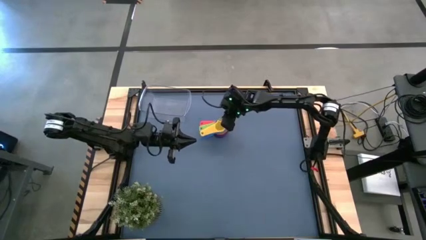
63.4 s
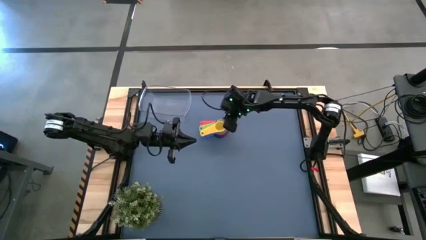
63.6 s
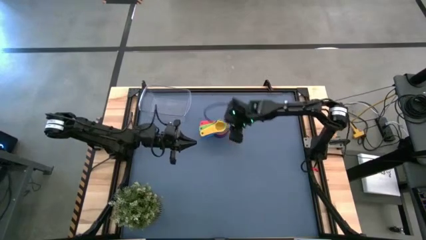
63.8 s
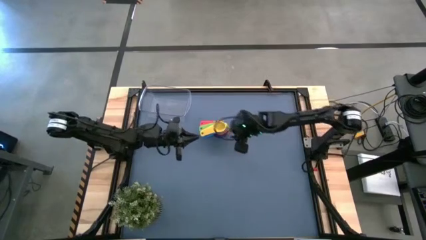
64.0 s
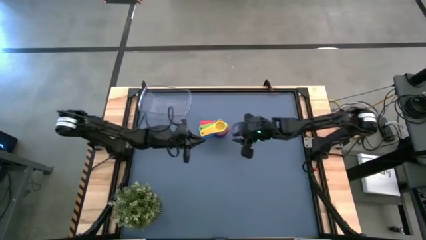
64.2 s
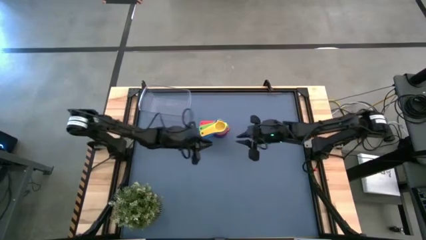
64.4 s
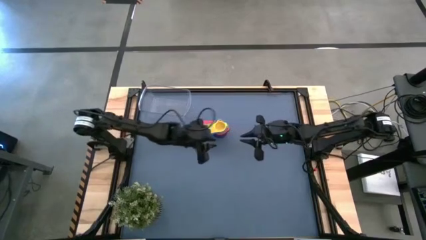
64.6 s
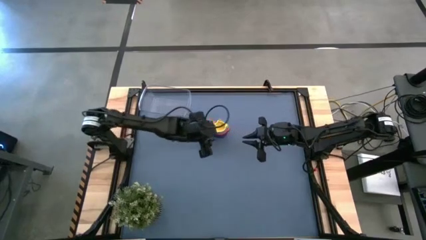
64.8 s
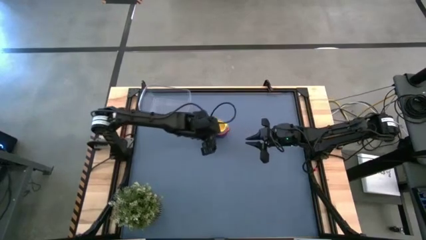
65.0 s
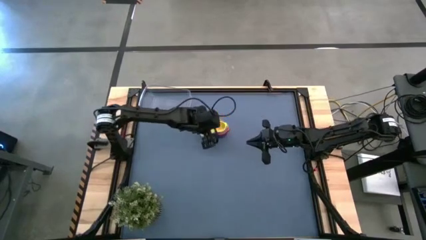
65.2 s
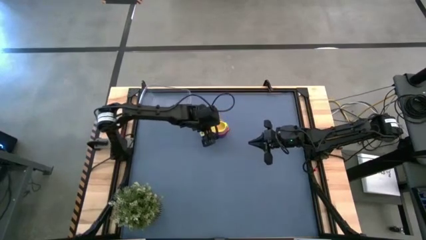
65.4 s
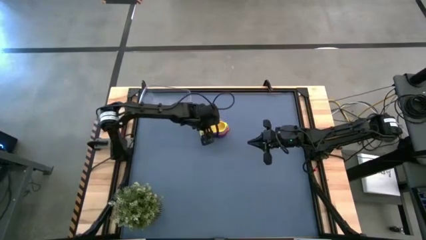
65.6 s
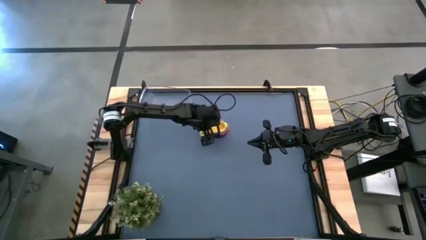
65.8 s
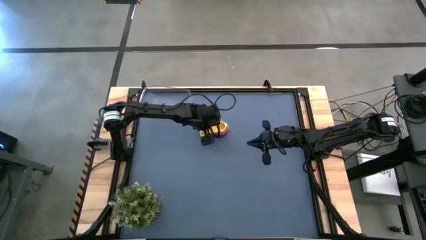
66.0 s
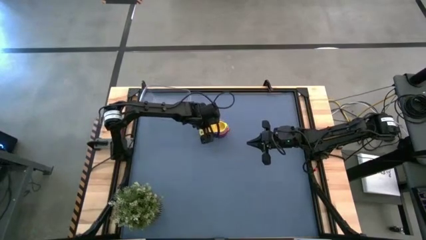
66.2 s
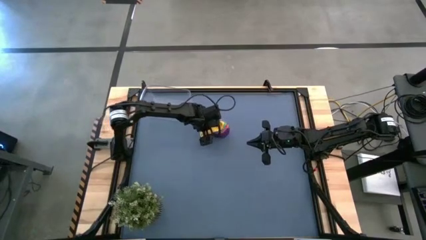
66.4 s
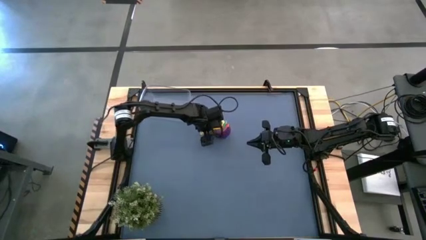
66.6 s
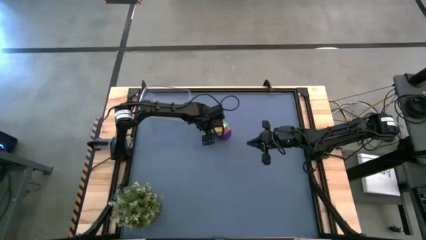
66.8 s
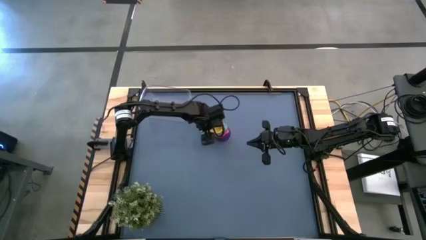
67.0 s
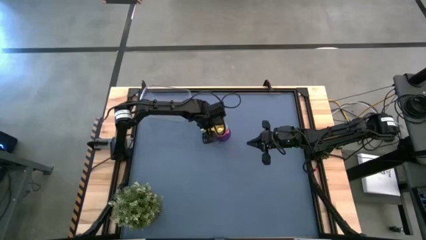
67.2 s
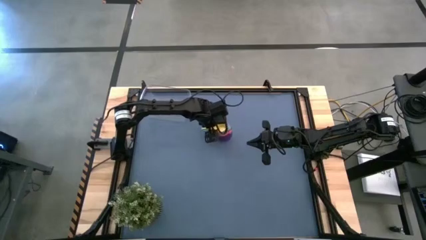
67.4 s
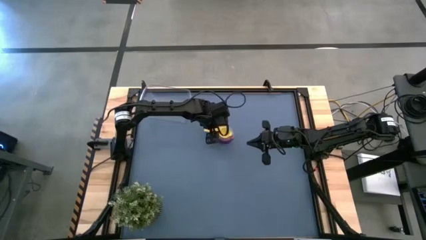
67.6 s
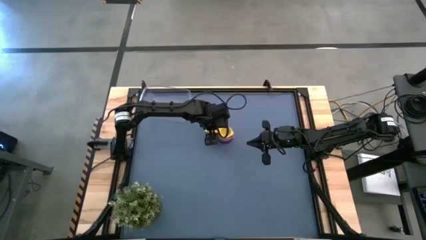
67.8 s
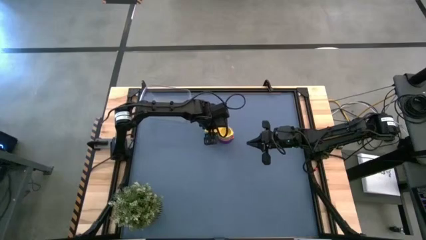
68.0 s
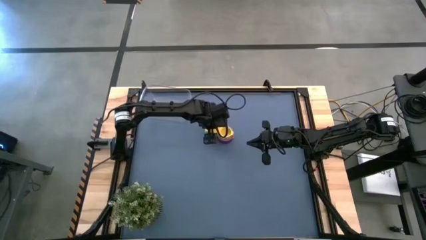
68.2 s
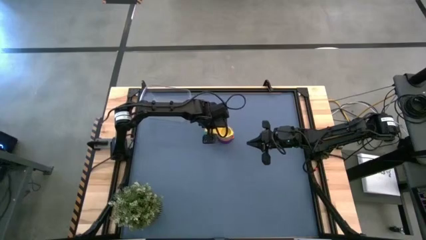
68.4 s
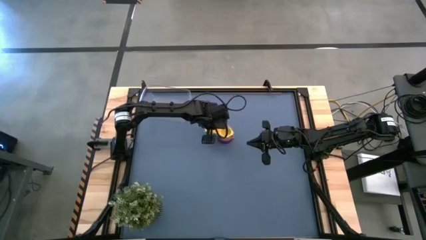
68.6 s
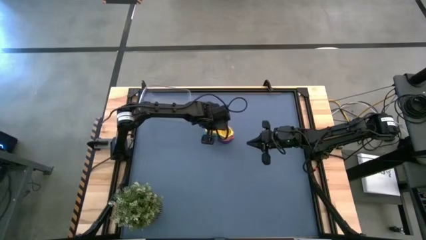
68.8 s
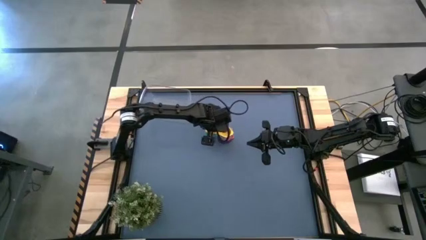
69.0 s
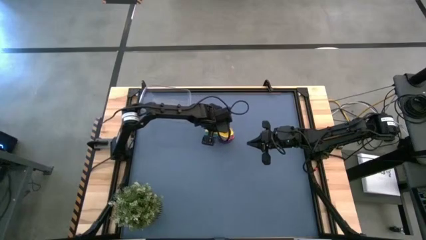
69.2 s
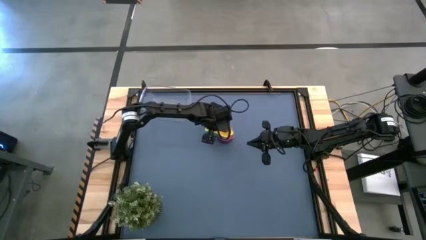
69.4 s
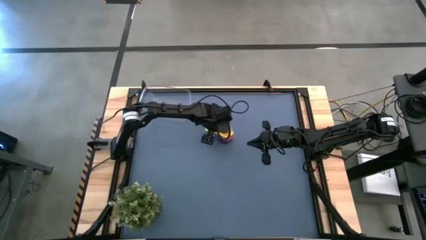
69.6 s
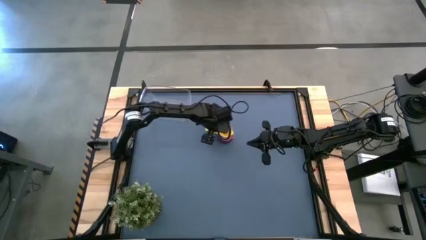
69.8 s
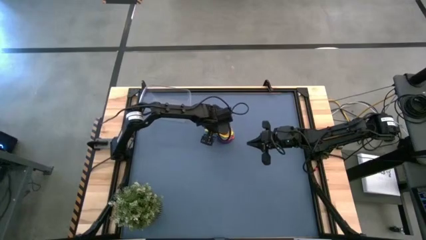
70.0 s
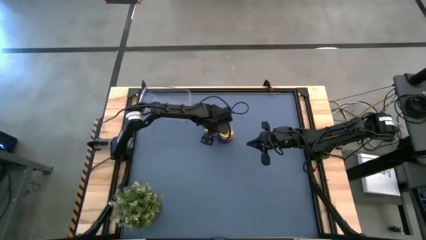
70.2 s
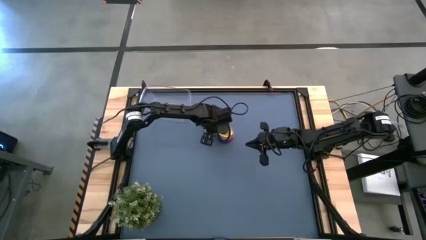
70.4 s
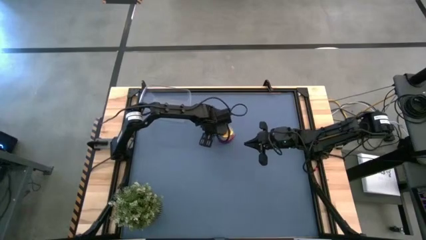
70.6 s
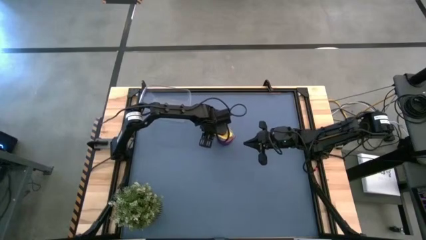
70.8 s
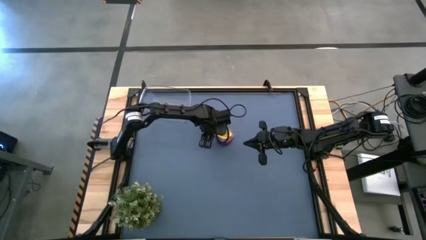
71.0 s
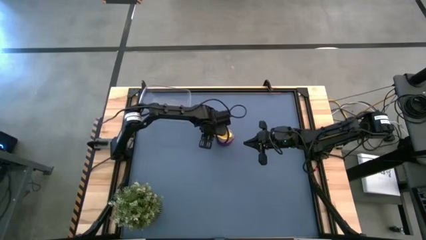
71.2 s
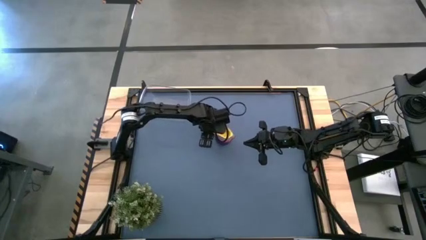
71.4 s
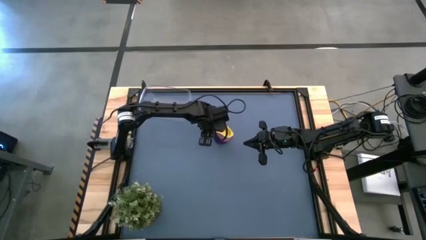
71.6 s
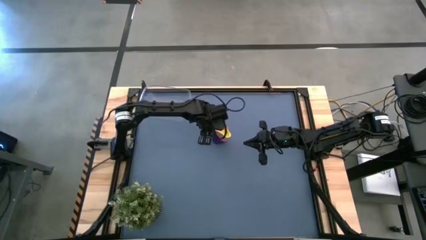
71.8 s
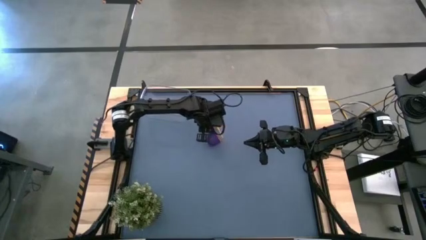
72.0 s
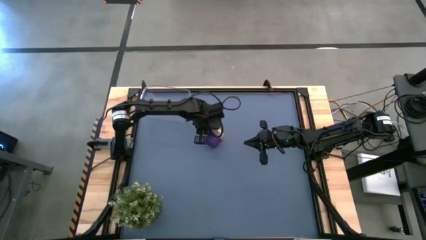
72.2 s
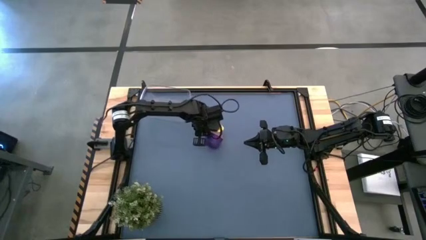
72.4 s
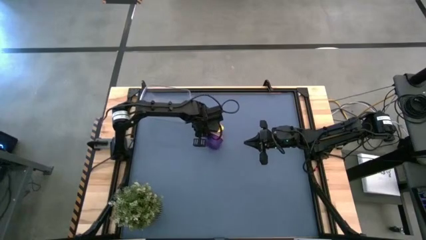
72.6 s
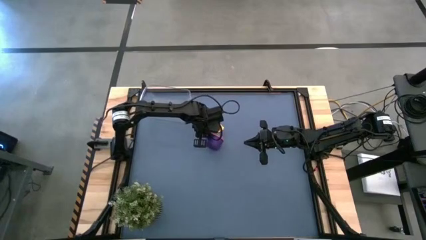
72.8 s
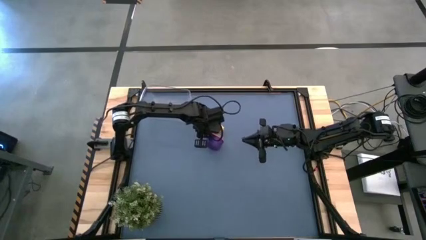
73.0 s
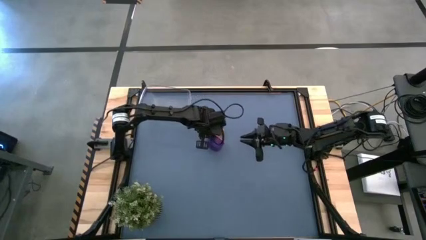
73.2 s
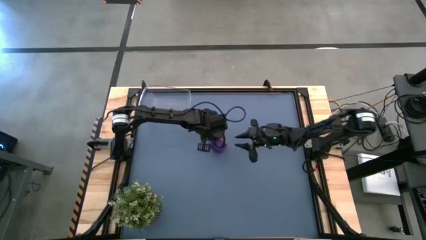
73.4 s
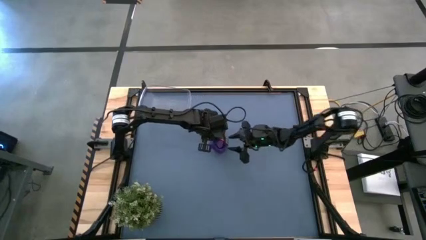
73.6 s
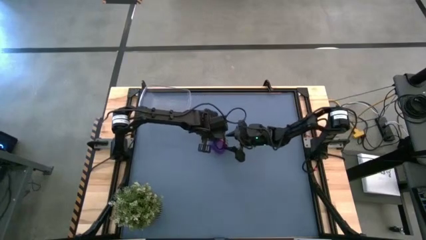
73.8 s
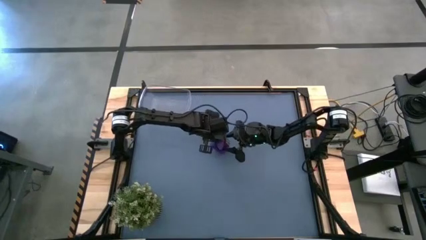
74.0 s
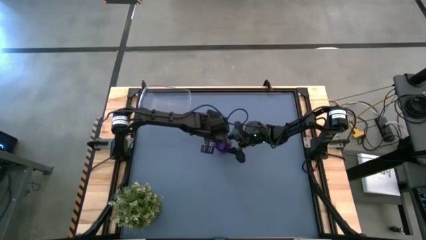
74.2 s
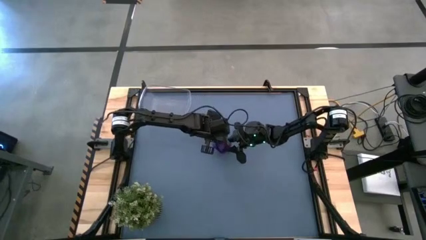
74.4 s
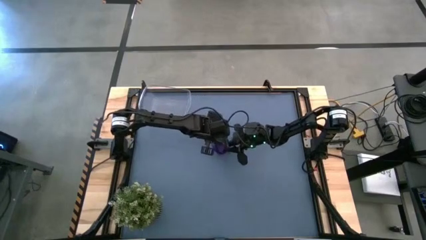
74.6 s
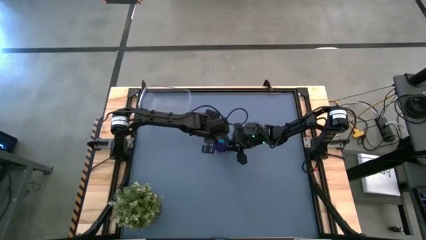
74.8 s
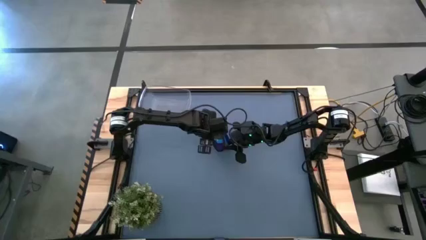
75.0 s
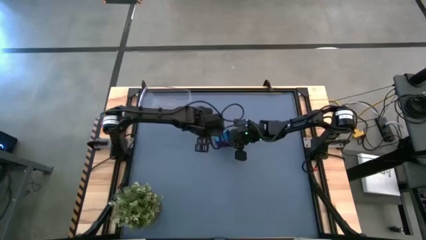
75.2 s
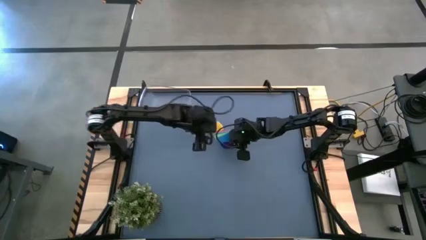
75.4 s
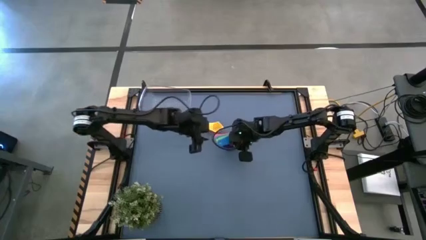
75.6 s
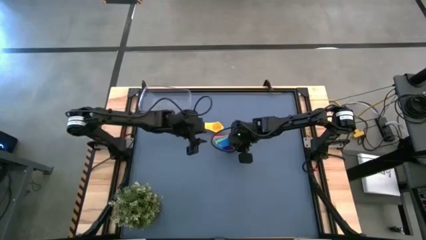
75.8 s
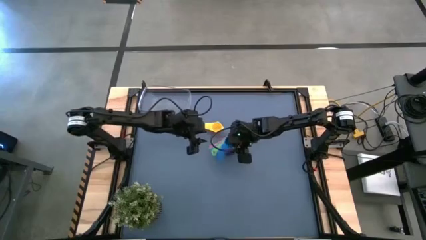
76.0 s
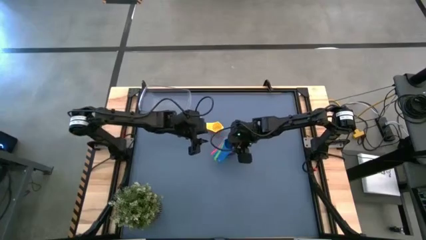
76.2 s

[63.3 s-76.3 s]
Task: Nest measuring cups in basket
Put the nested measuring cups into the transparent bin

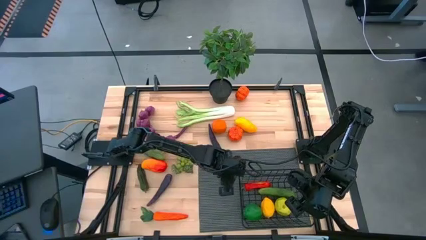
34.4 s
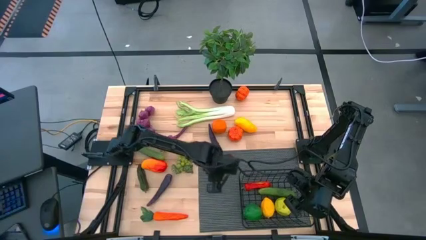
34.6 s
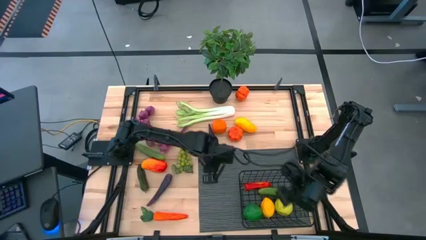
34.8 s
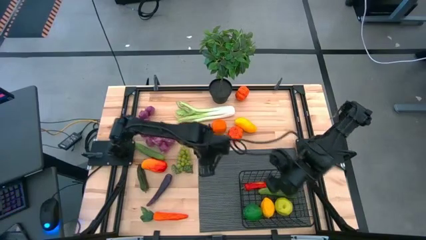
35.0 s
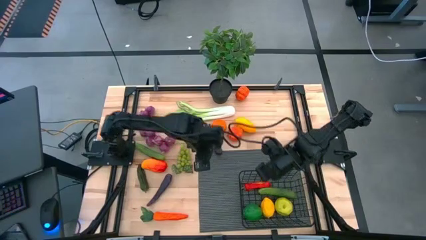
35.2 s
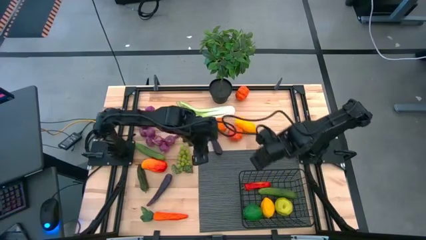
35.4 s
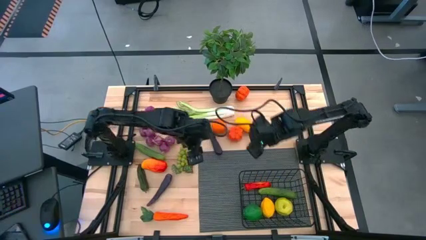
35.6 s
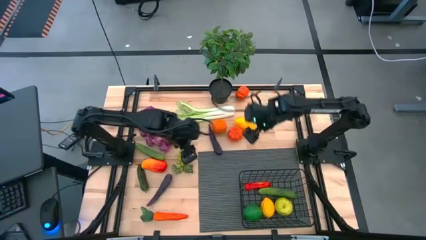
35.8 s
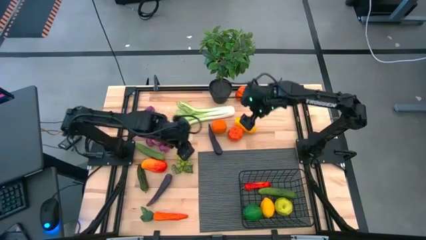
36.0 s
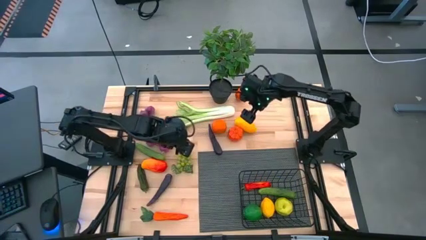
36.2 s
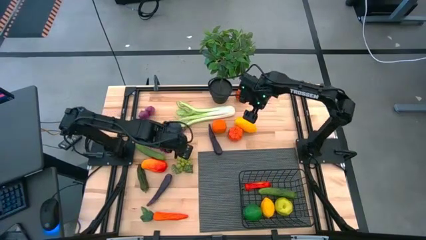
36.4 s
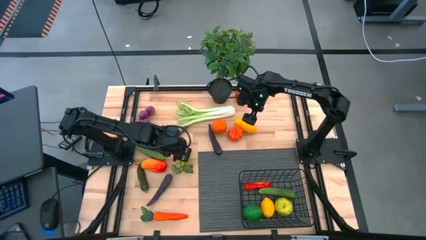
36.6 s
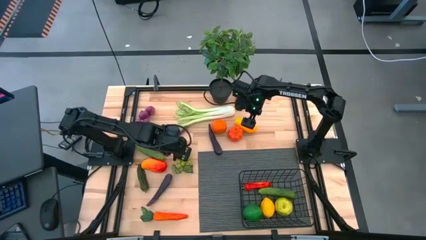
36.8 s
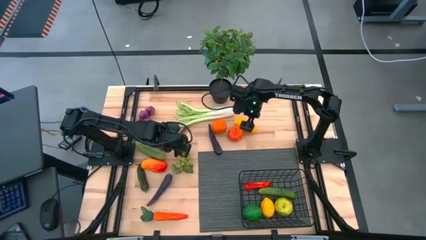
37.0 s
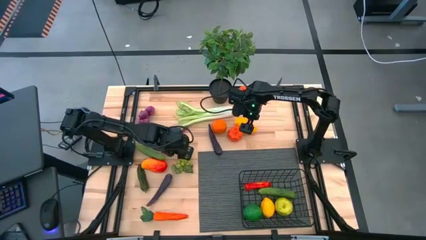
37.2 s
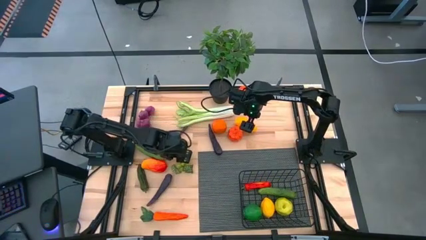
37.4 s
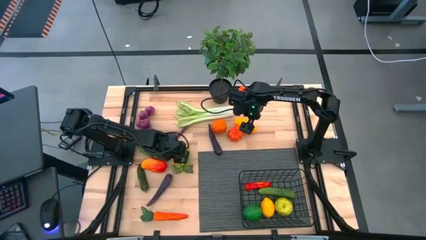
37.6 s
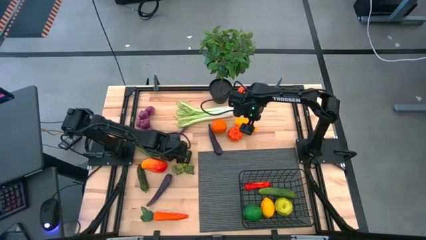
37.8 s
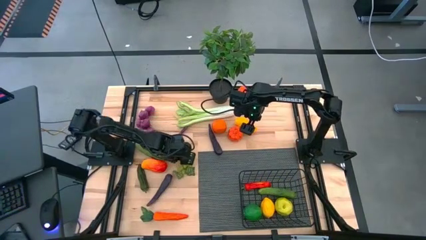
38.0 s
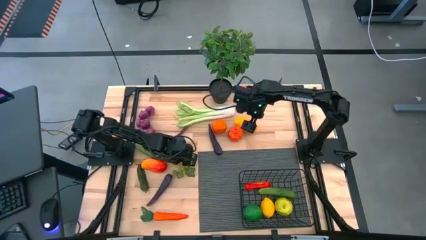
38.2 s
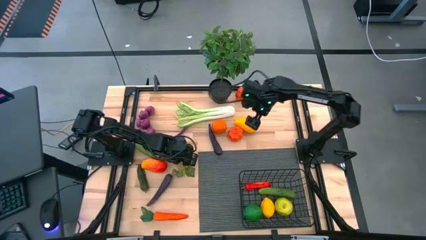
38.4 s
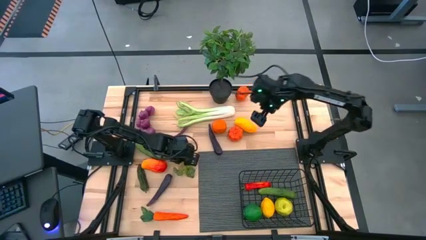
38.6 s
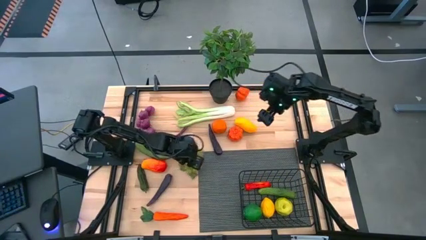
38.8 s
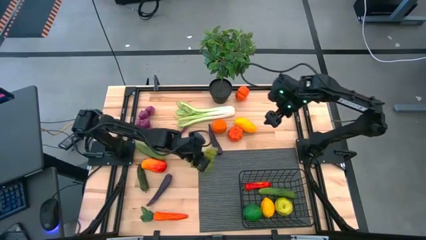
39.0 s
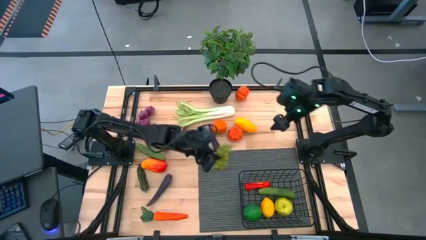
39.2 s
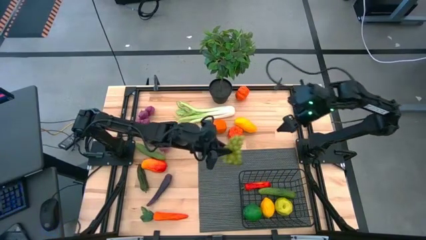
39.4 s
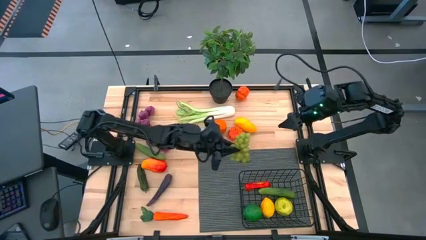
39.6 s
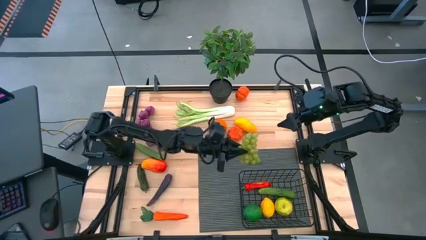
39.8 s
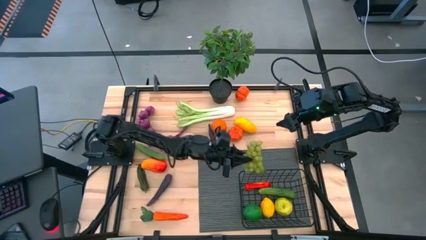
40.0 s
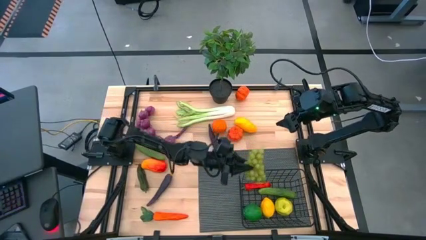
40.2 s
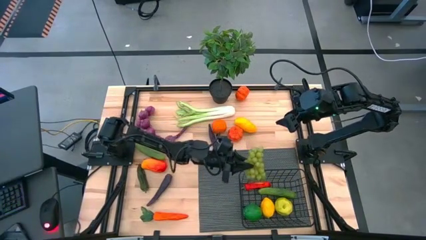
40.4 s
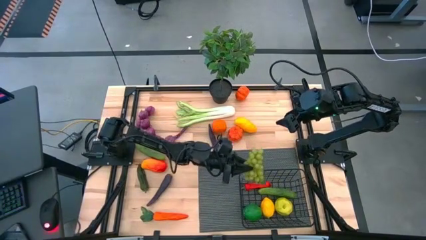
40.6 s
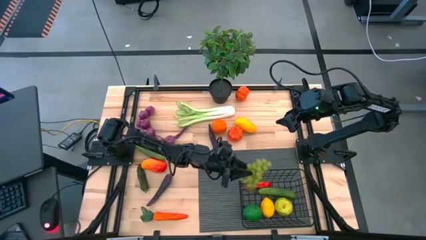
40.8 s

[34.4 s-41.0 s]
Task: Build produce basket
Put the green grapes into the black wire basket
